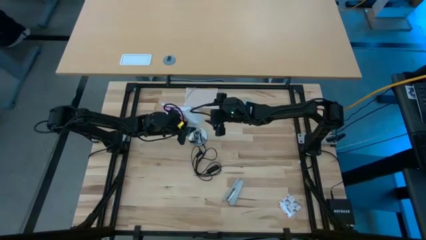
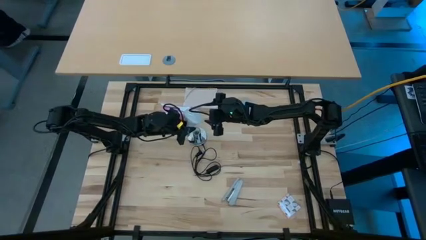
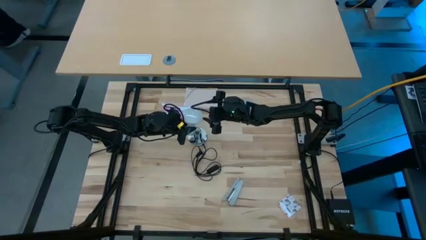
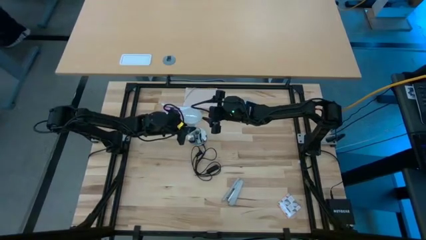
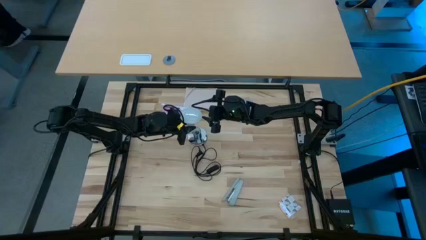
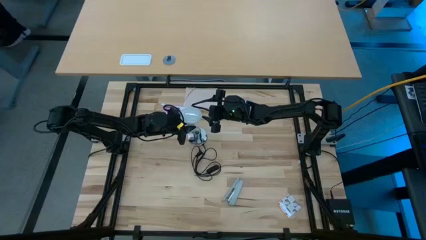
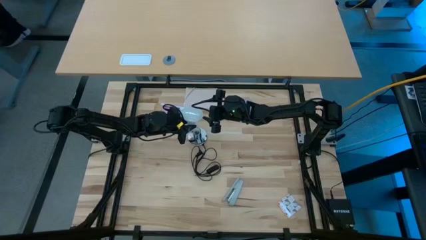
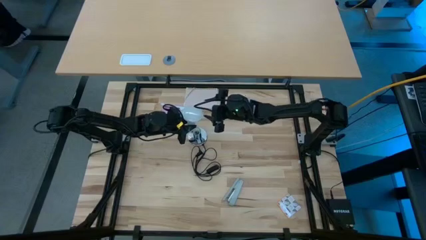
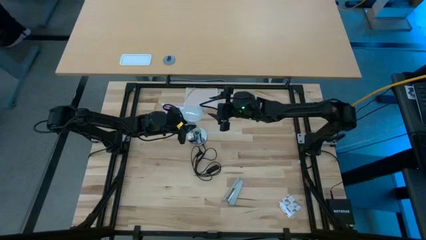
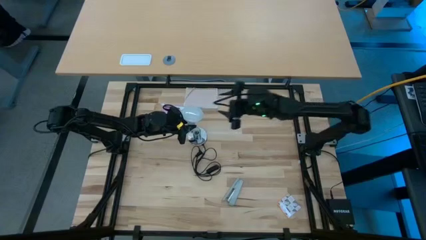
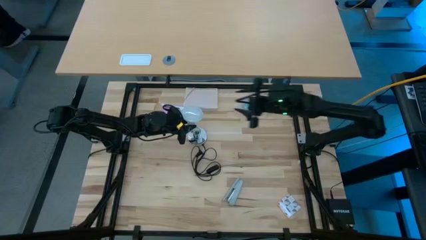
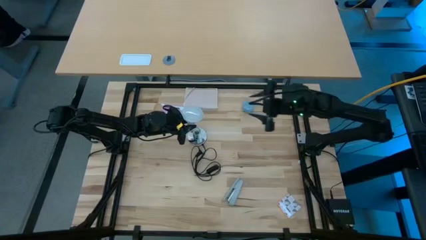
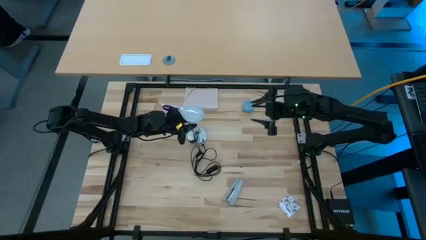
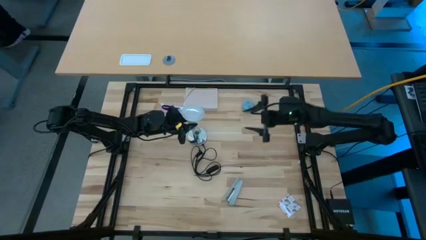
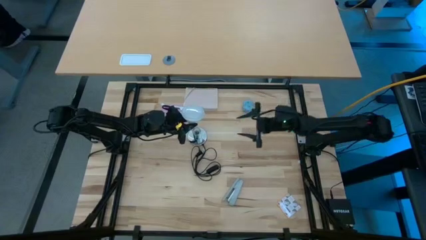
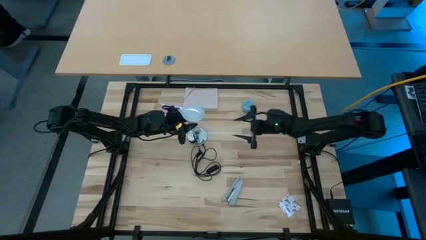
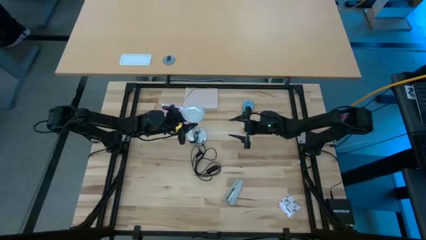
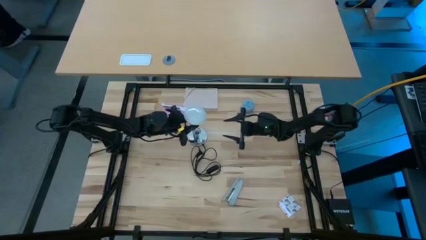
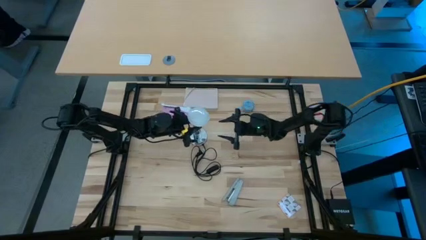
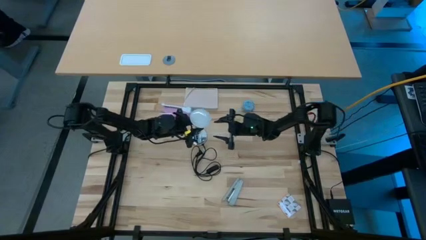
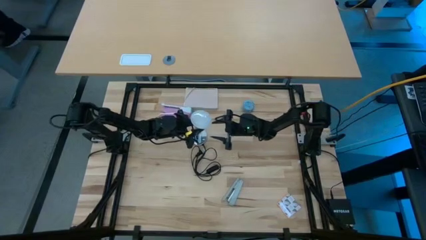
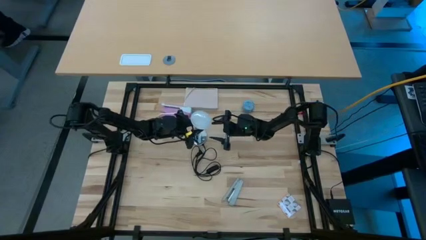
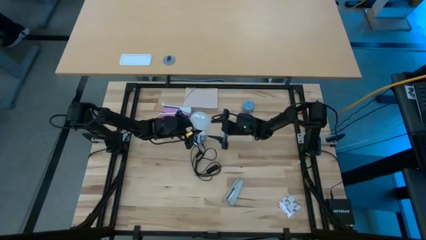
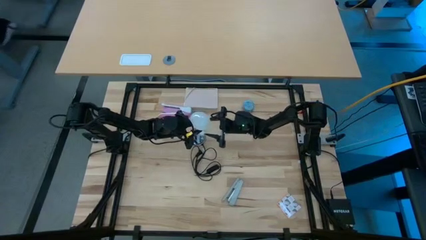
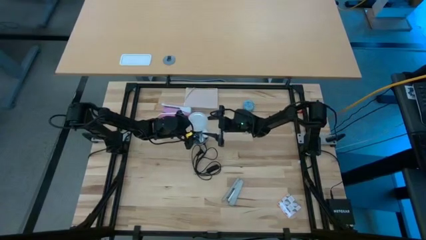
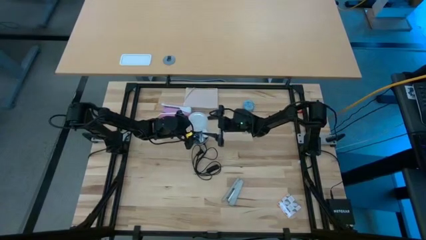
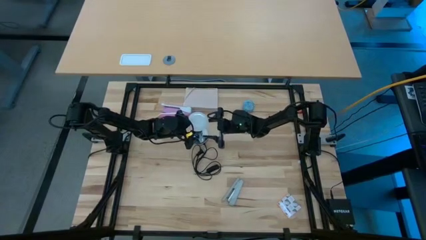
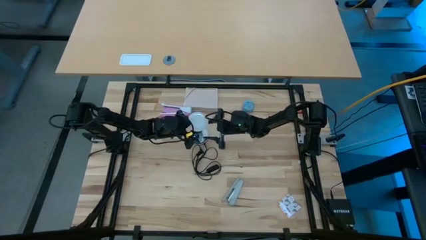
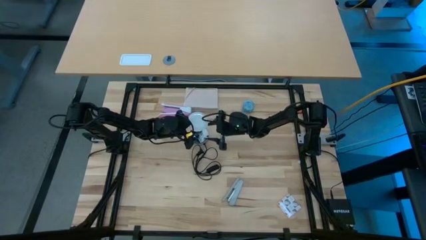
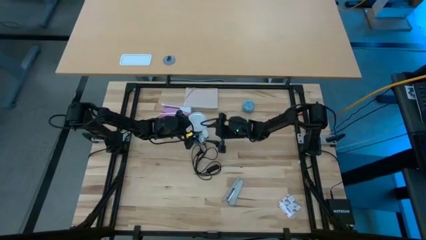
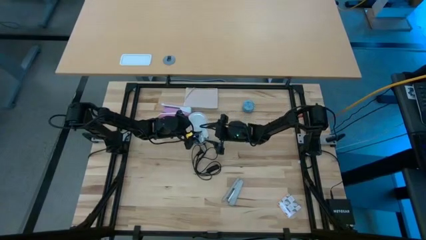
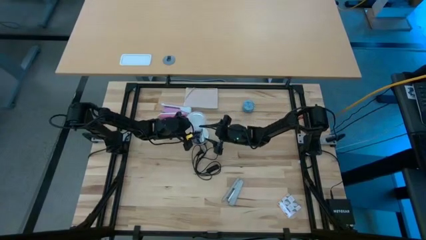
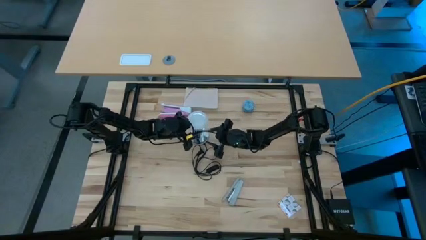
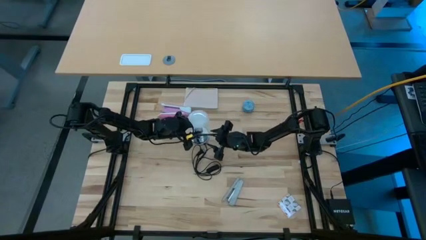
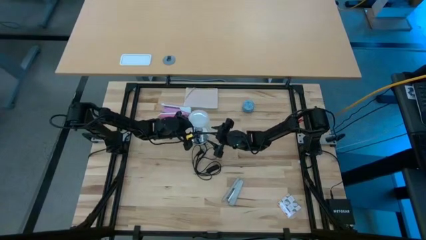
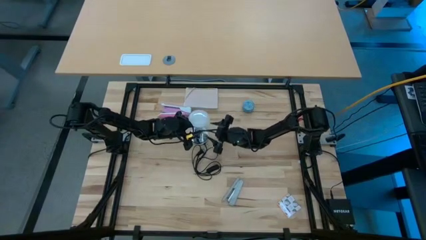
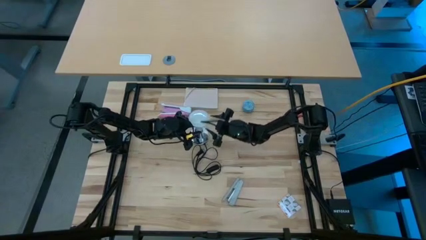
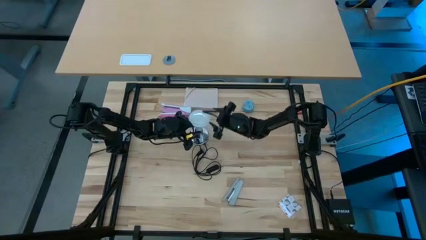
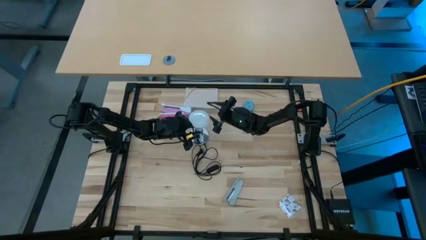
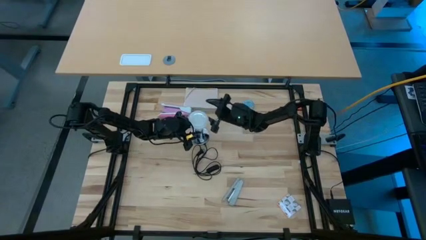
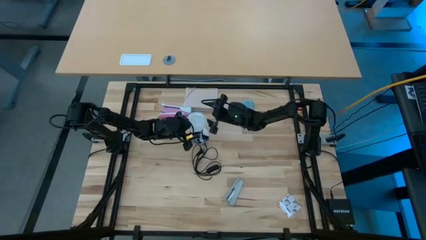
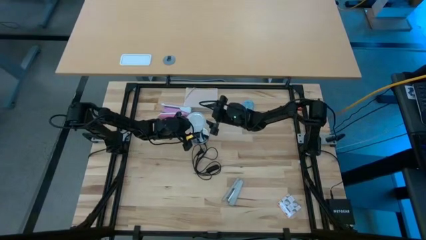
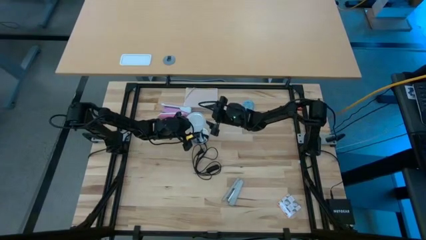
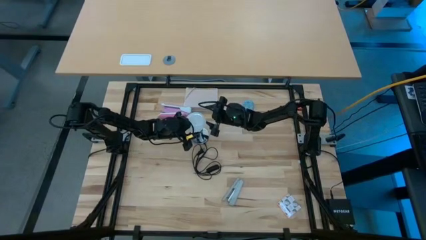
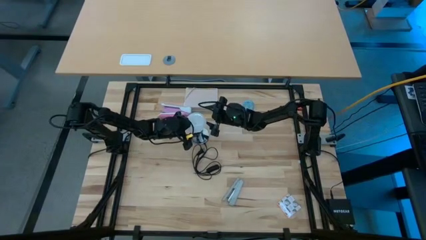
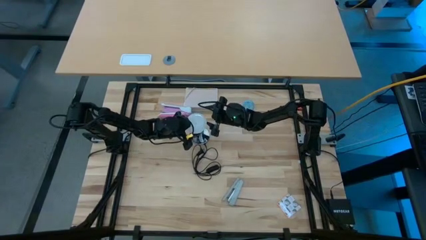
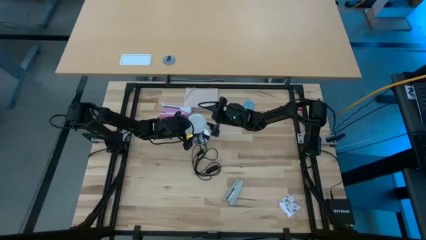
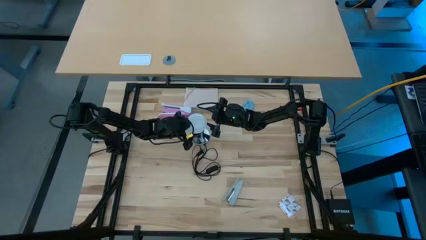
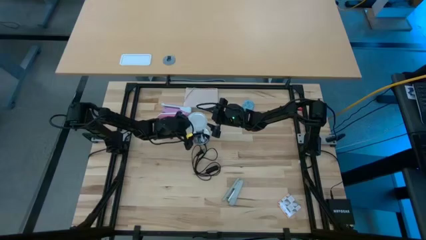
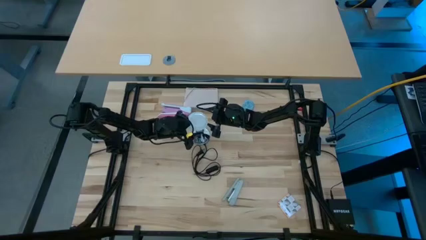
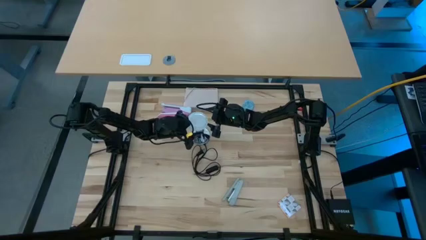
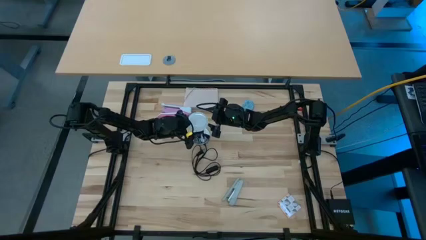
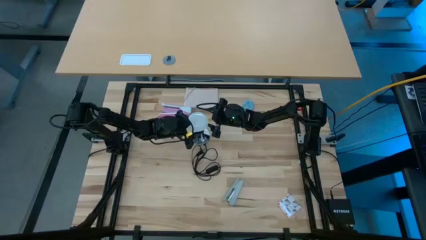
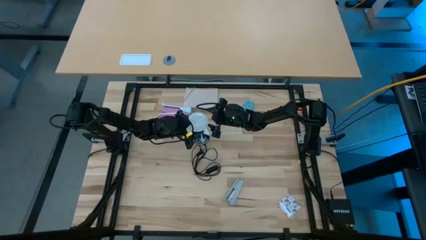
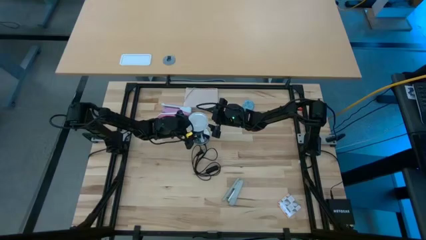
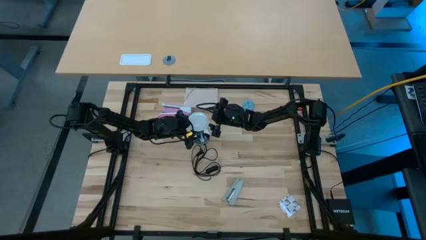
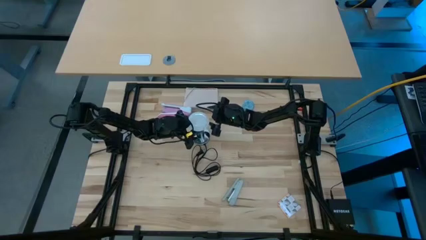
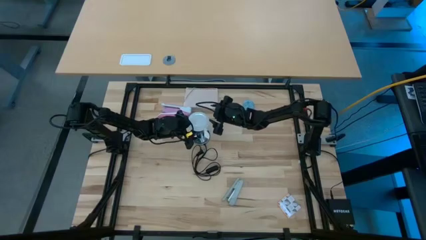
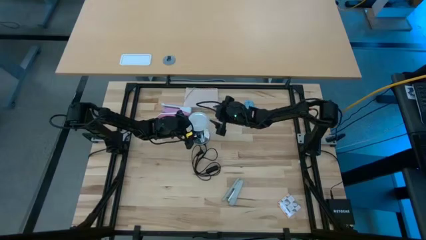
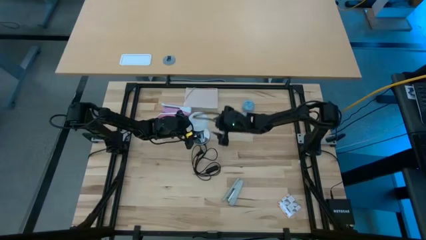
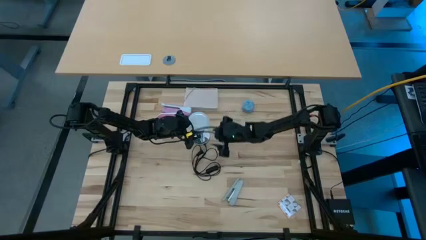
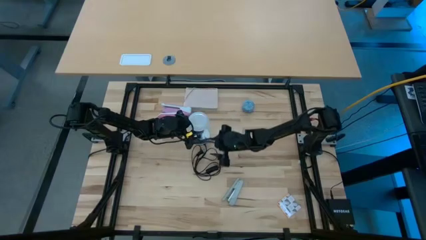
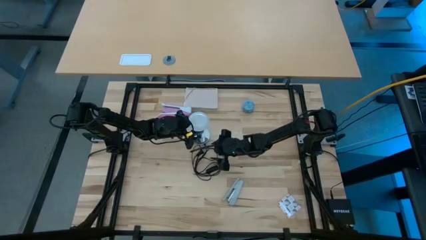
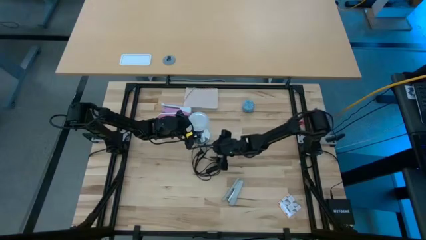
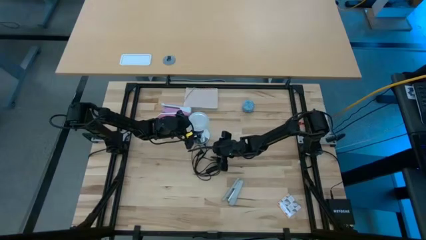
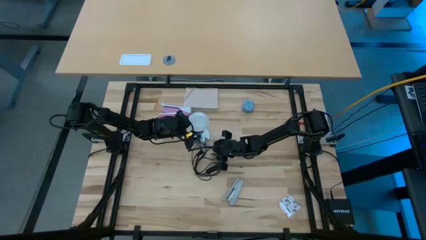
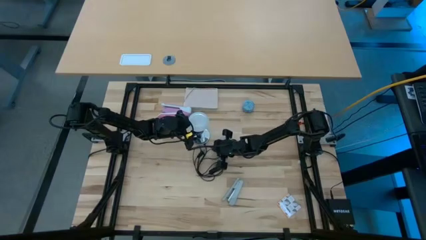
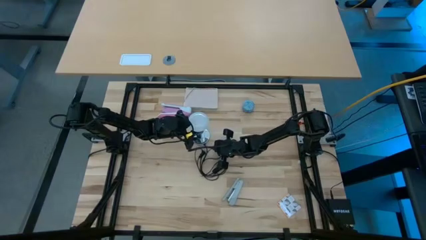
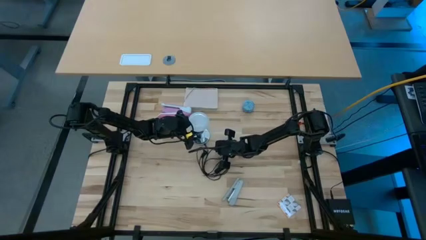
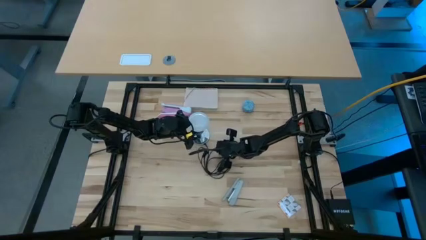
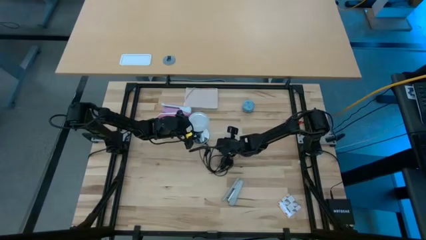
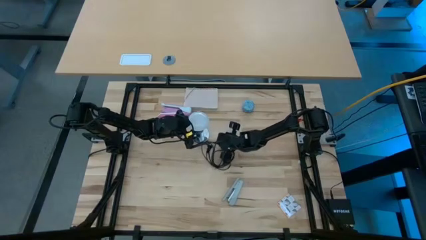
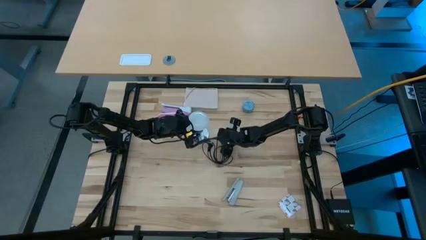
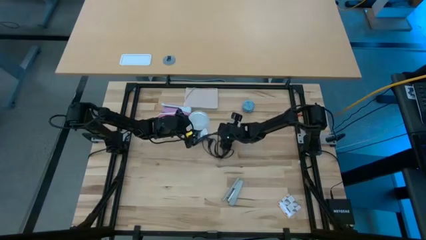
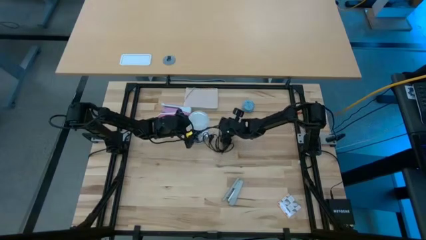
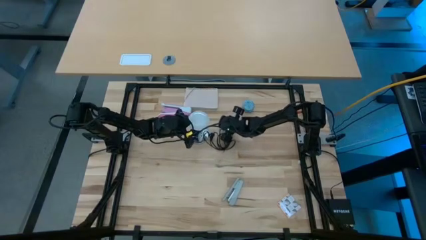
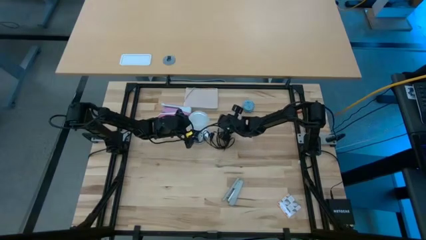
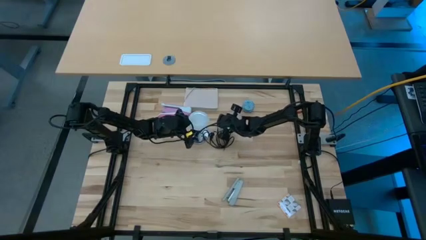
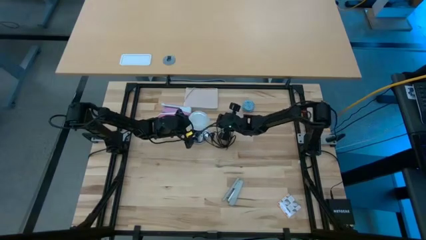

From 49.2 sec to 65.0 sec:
Task: Screw lightbulb
Insert light bulb into the lamp
